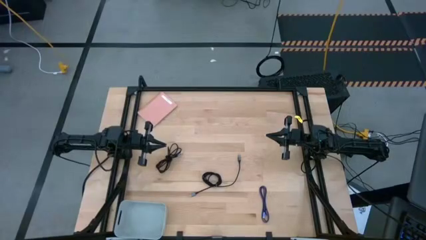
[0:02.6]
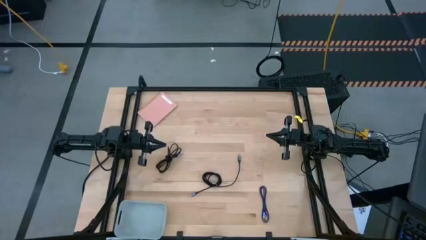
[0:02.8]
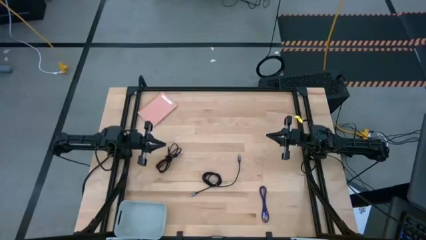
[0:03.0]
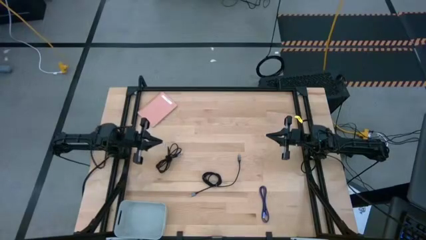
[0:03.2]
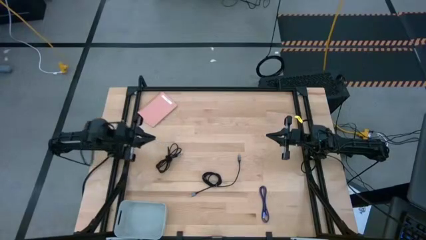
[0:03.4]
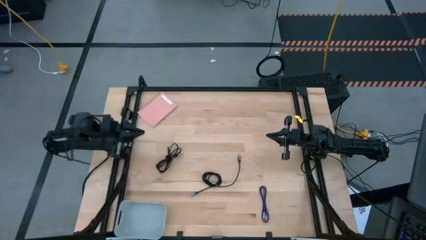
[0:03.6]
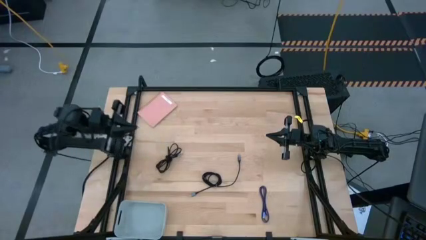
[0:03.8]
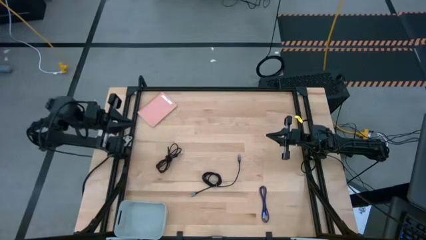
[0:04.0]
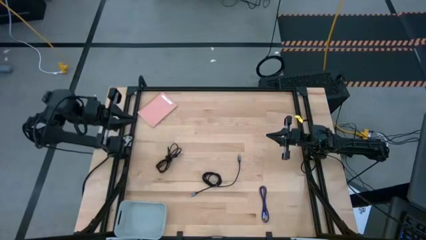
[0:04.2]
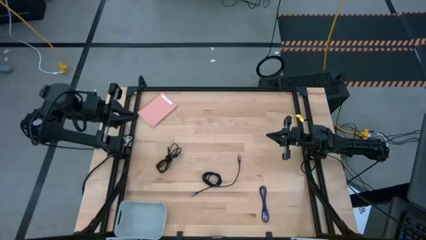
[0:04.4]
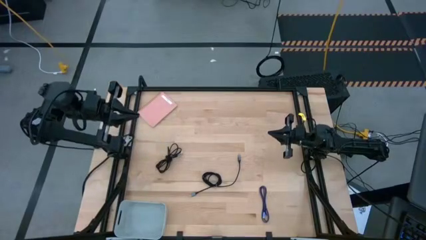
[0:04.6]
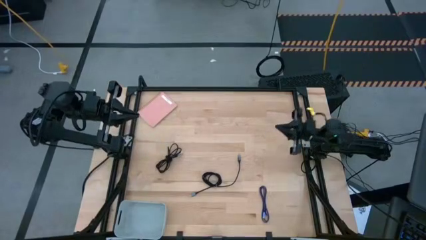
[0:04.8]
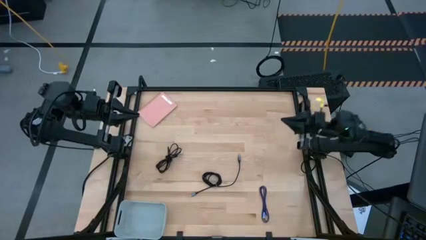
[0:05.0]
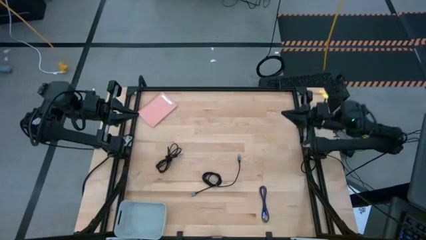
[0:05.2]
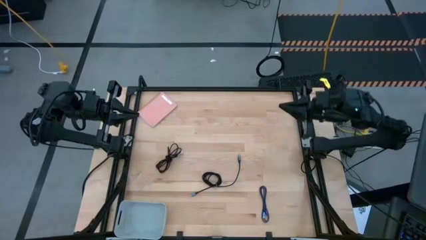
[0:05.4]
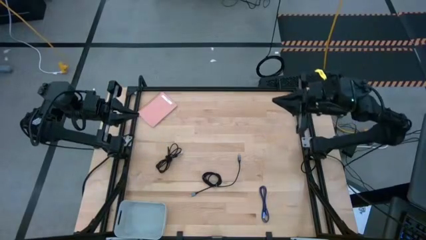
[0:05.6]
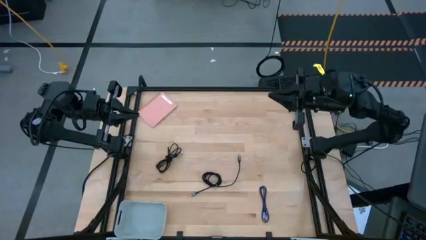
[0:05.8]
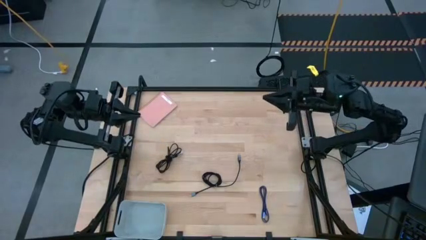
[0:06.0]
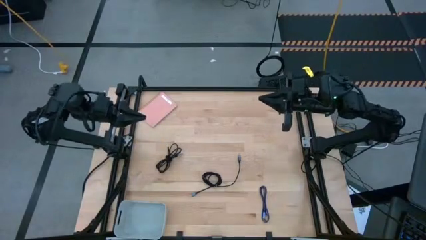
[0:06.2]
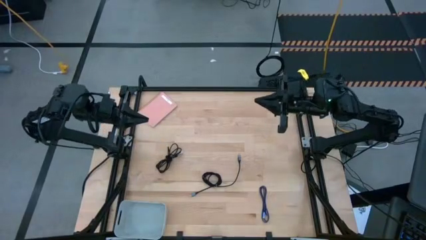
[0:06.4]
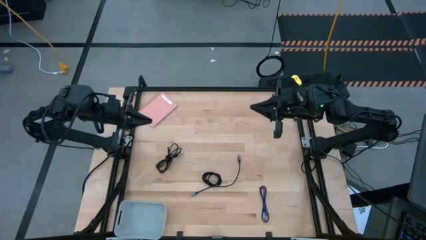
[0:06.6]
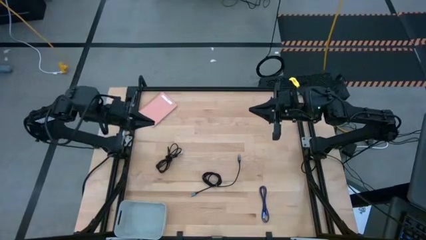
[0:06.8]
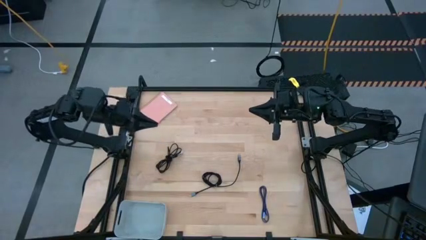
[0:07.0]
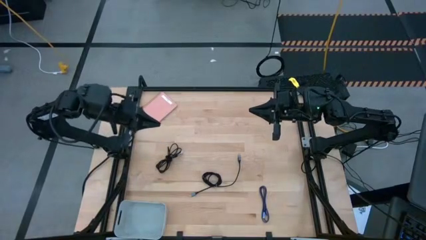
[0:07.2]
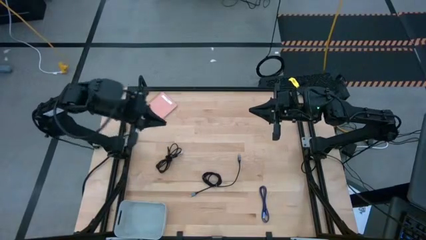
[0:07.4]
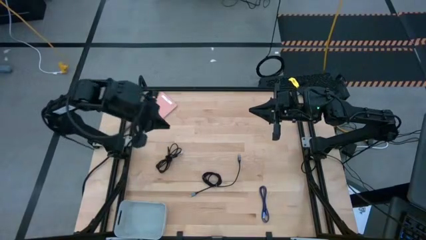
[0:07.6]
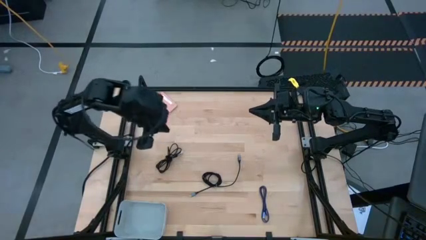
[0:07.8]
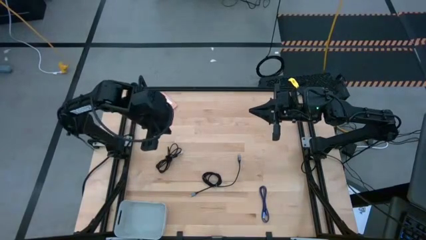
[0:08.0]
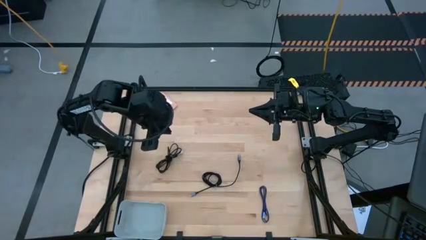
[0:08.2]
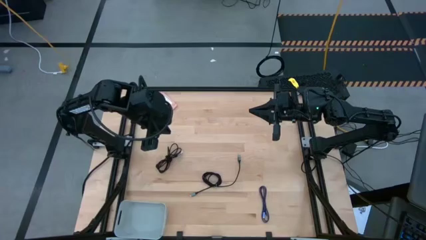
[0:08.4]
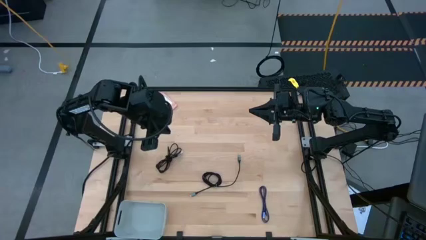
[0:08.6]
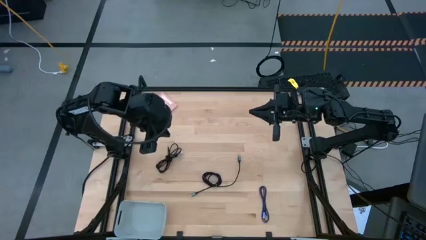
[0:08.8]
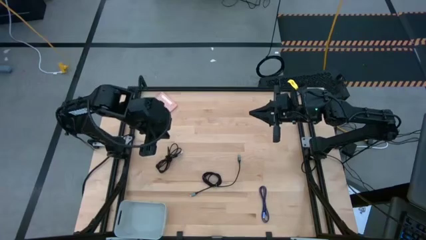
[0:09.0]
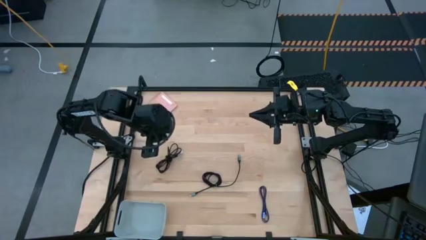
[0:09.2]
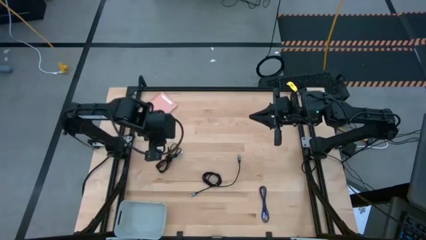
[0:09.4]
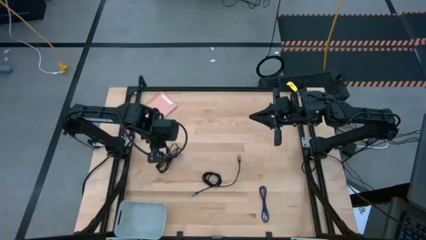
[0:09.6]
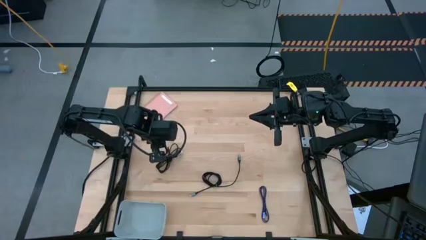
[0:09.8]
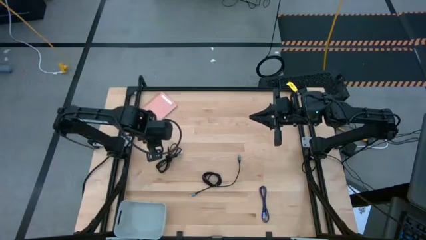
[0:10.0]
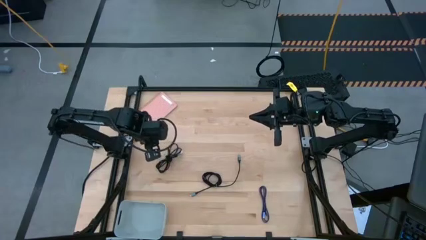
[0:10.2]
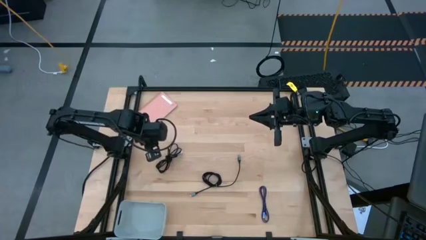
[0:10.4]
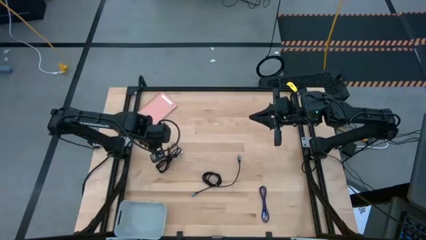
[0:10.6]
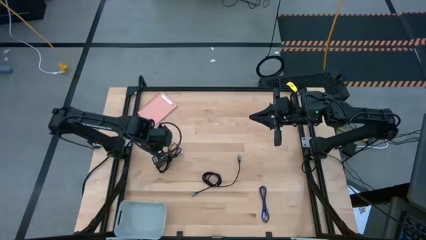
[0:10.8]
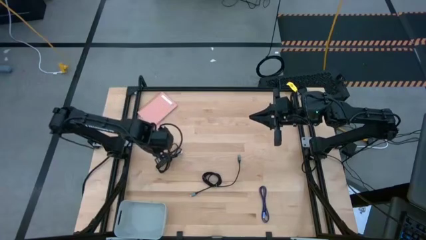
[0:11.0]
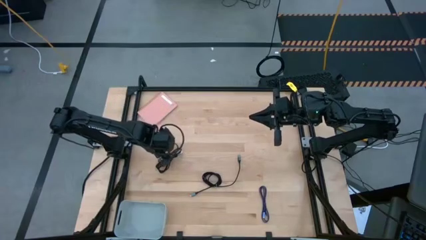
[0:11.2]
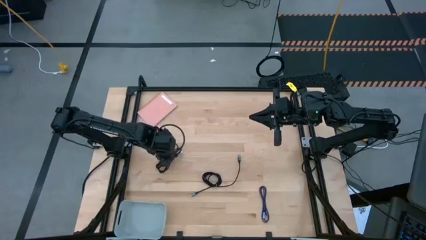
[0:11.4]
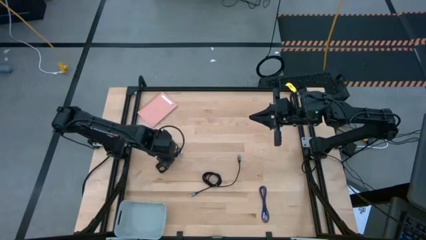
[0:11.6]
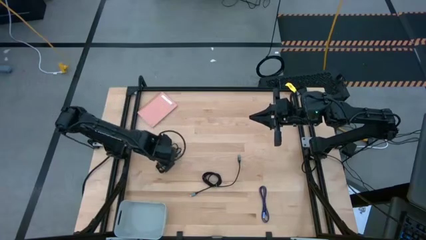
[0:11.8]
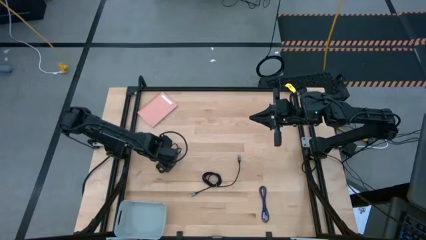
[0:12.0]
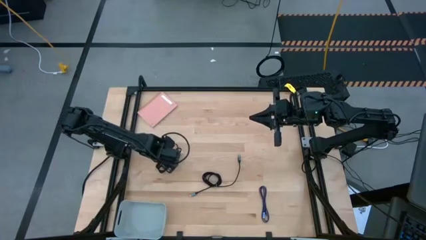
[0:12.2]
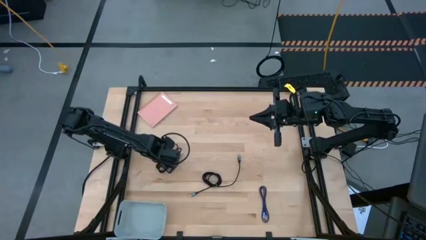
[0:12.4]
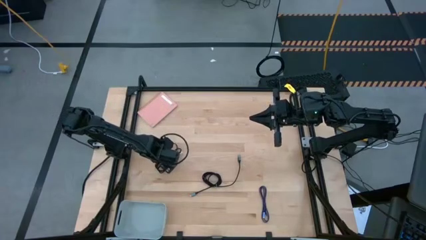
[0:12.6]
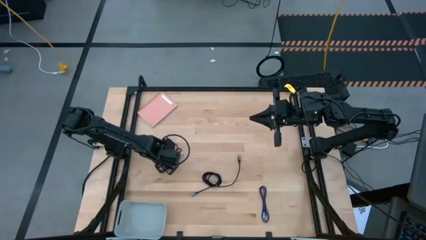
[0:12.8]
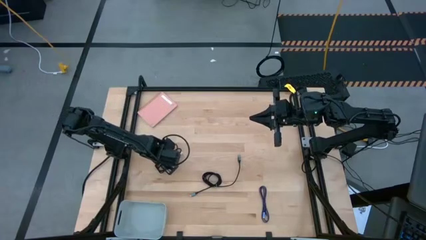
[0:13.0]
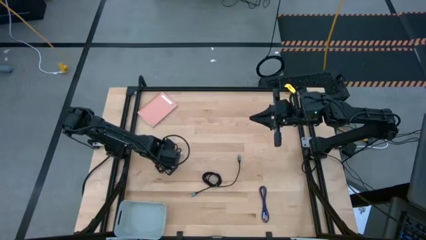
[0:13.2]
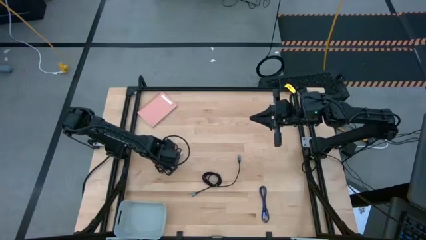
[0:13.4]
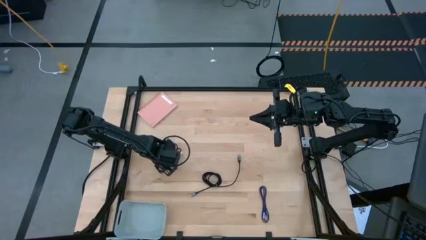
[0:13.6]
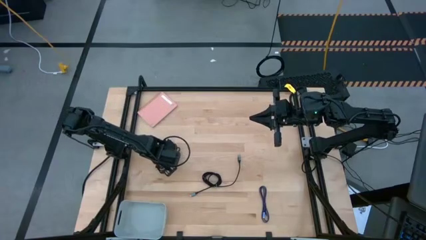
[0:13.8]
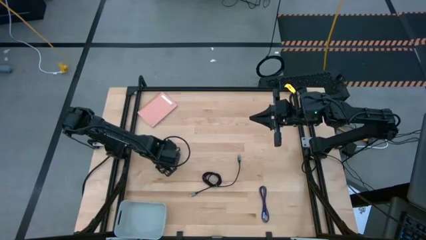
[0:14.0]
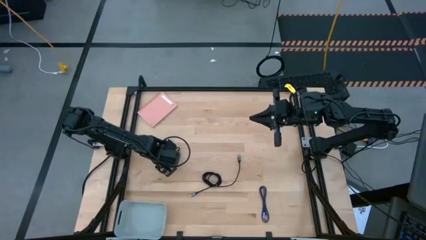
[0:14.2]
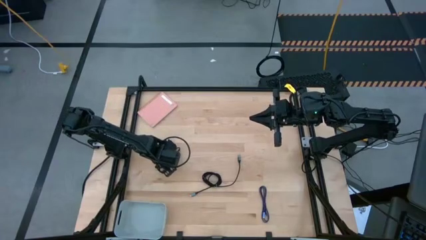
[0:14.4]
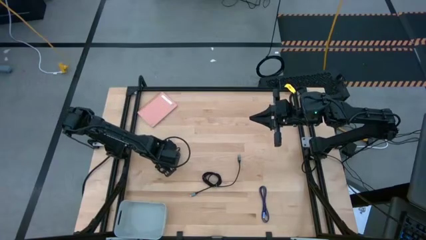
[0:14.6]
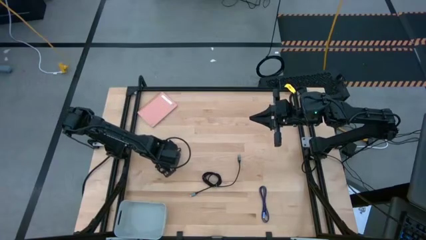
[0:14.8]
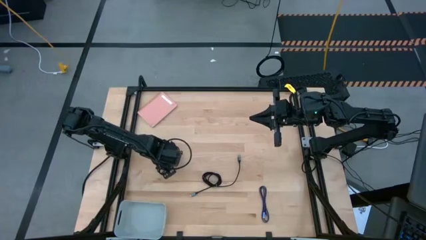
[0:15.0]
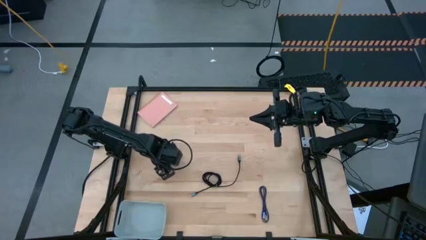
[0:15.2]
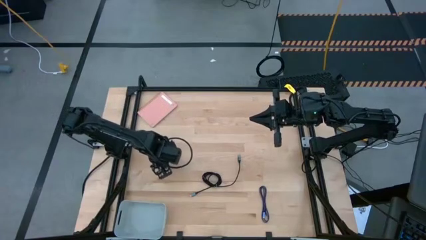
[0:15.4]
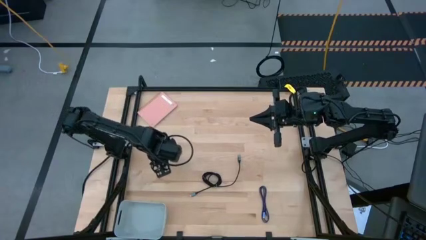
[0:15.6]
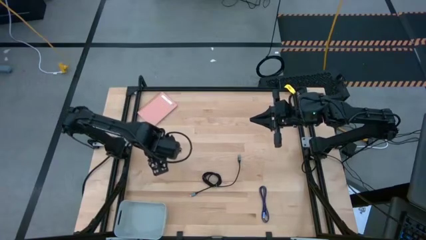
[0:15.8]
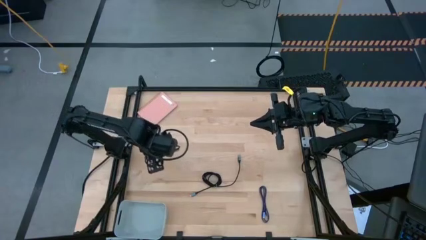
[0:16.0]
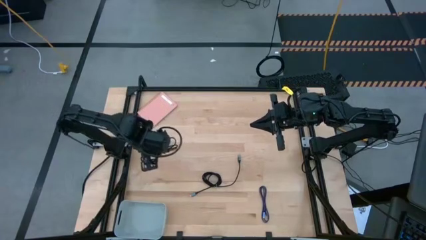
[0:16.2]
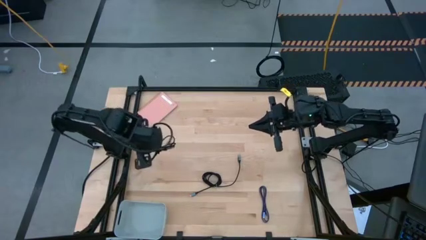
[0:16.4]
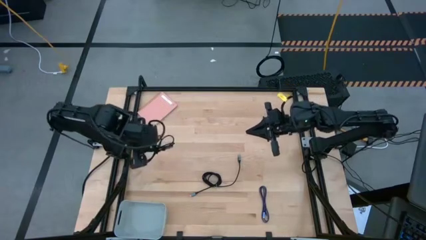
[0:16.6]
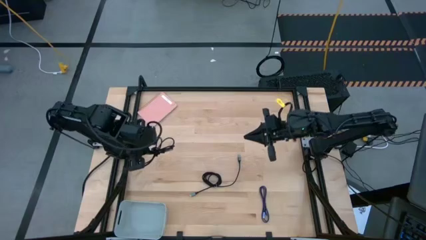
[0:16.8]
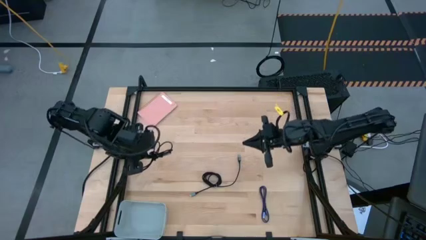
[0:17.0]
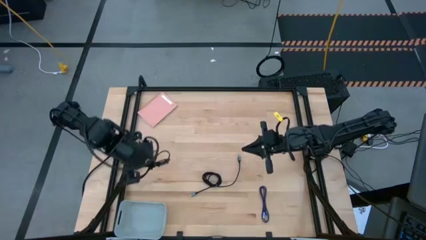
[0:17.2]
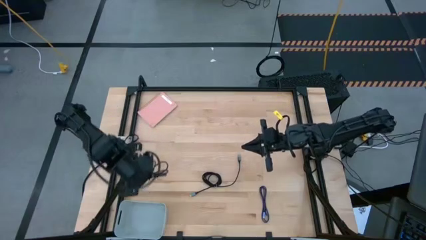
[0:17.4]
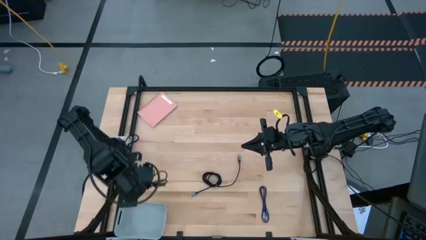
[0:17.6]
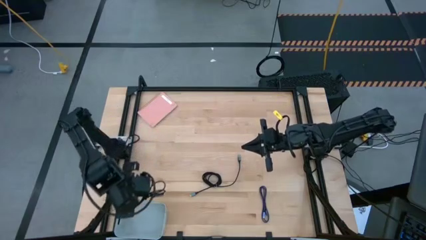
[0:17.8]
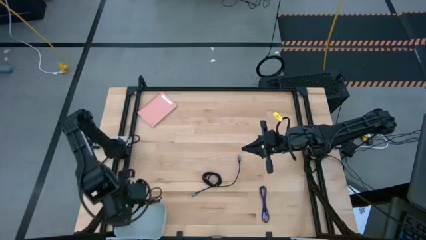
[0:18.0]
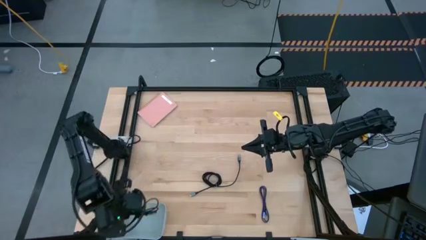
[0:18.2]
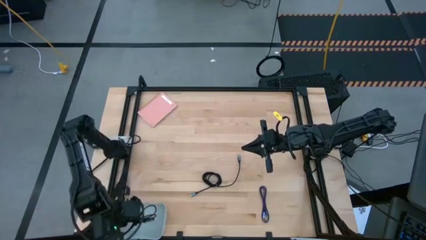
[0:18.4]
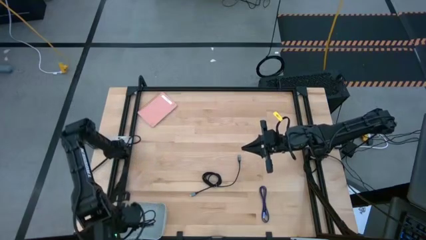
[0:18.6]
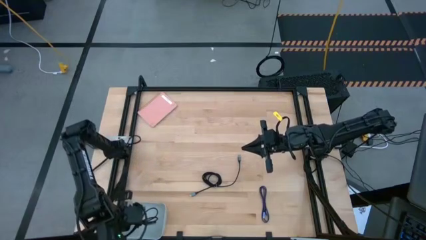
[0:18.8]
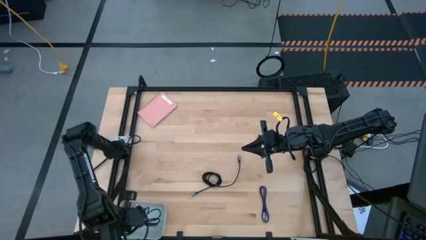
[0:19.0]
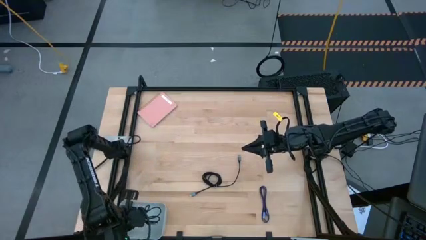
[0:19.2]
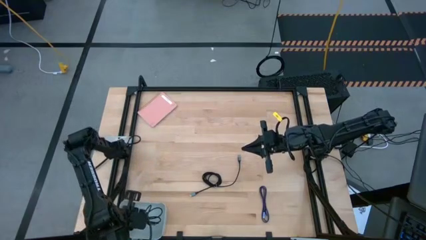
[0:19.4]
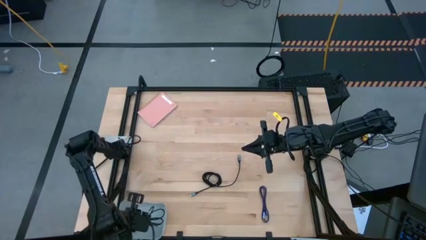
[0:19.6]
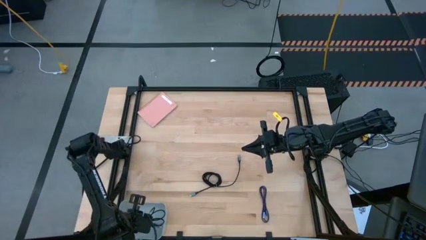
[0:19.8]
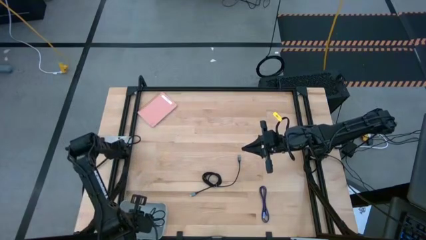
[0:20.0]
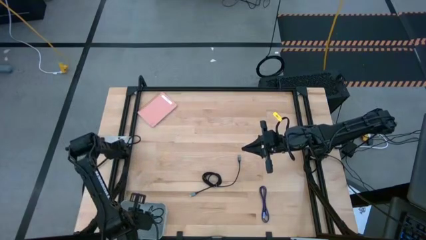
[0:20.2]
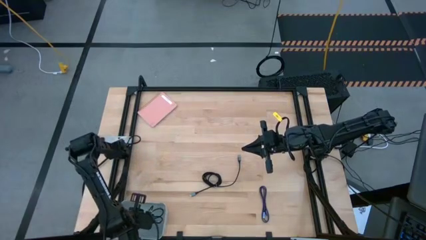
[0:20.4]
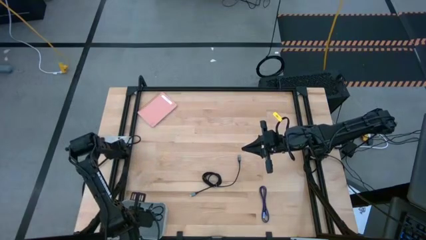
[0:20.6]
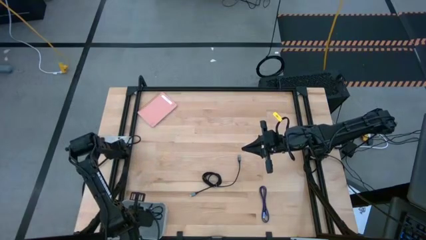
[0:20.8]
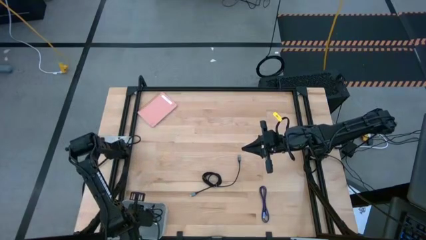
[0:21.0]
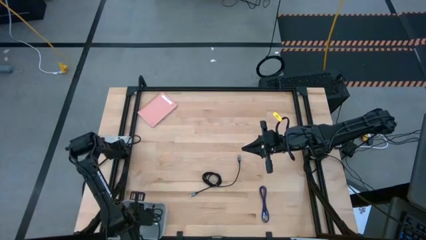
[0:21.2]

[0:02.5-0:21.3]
Task: Pick and place USB-C Cables
Put the left black charger cable into the white bin
